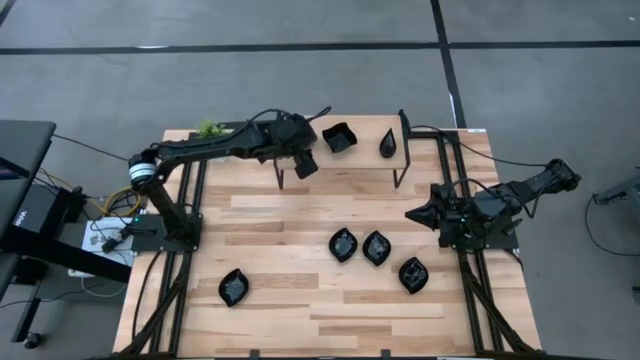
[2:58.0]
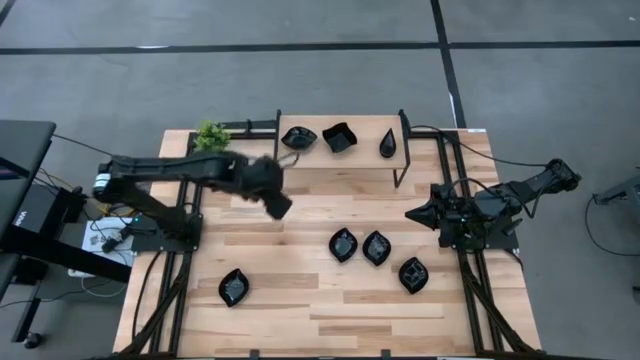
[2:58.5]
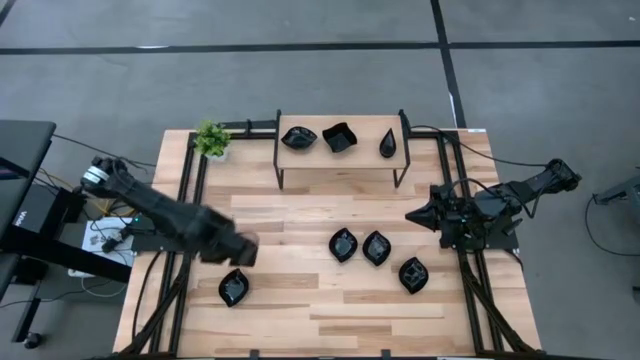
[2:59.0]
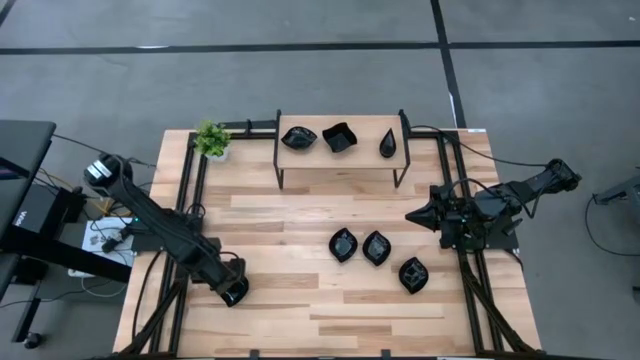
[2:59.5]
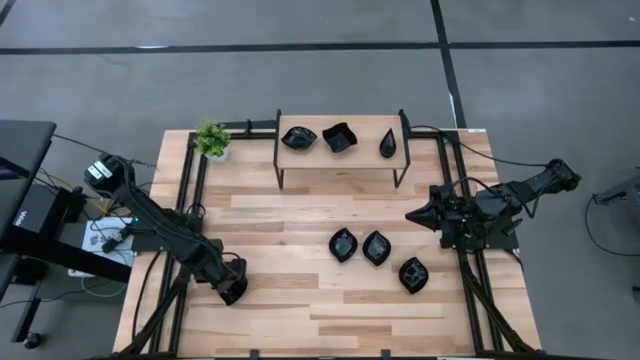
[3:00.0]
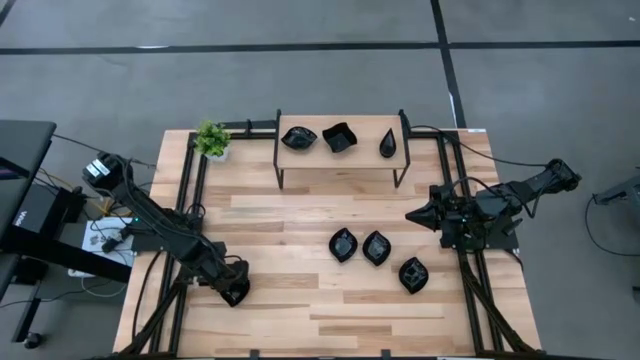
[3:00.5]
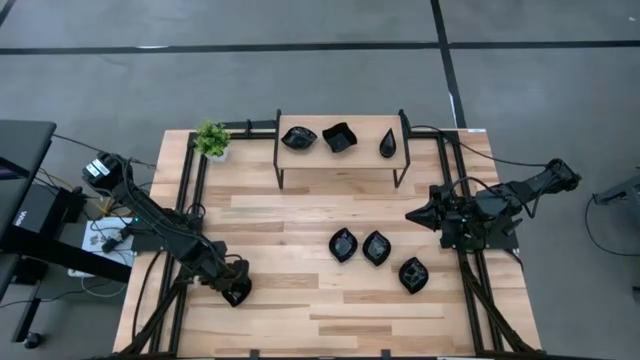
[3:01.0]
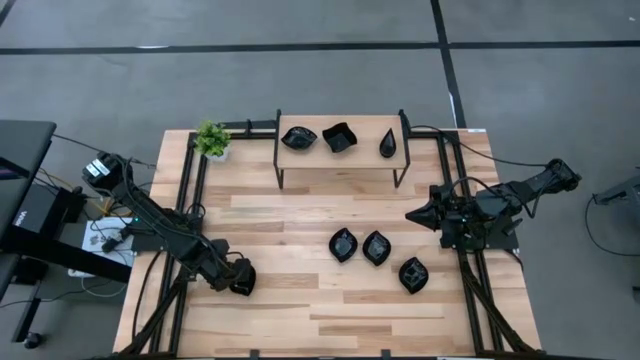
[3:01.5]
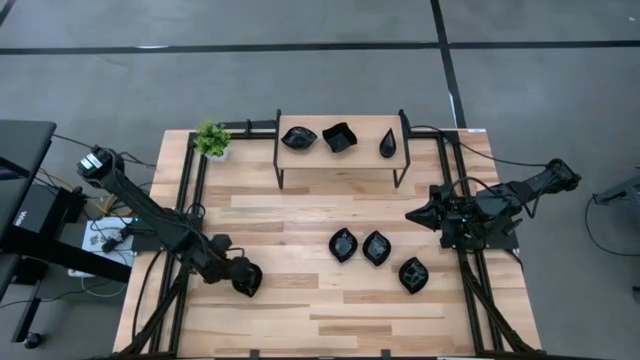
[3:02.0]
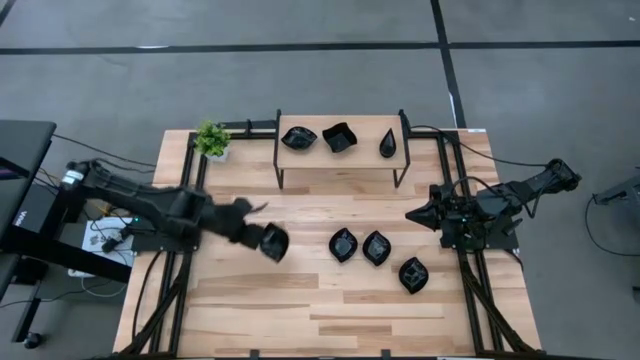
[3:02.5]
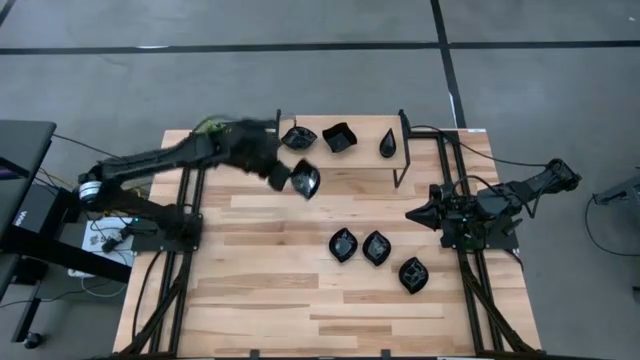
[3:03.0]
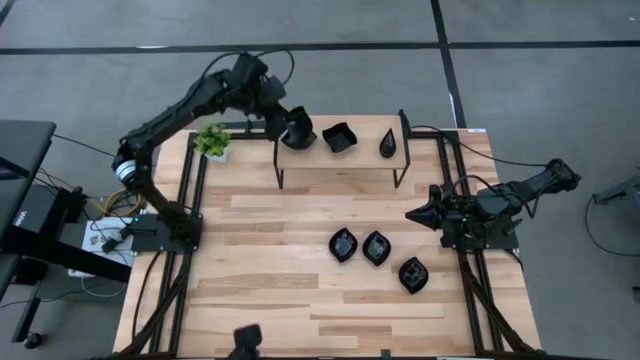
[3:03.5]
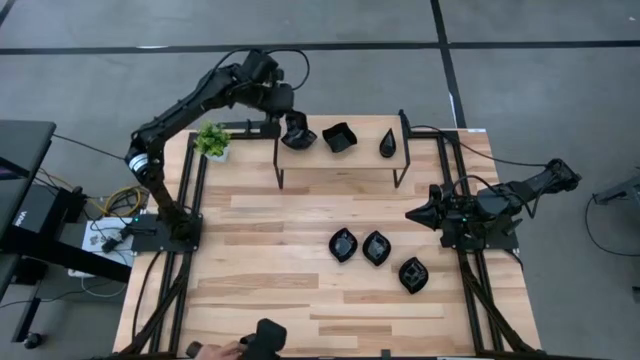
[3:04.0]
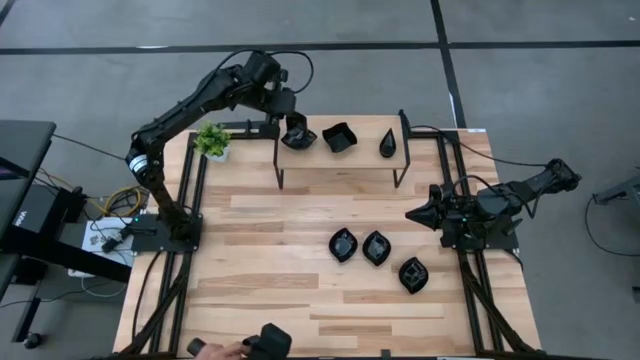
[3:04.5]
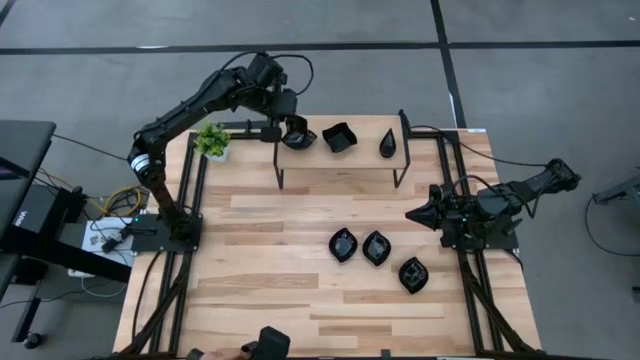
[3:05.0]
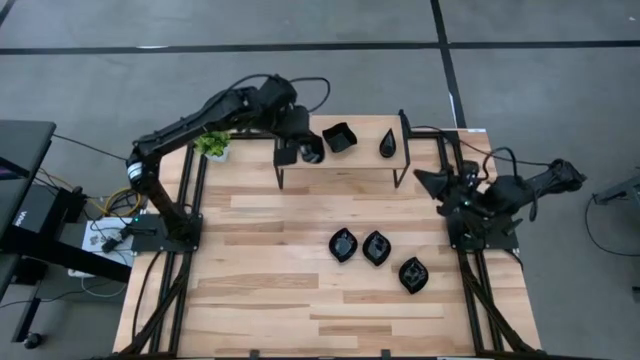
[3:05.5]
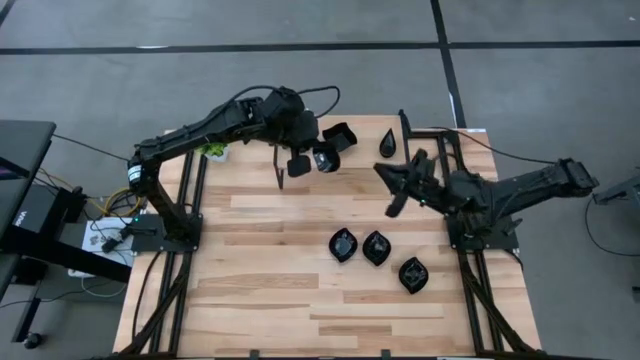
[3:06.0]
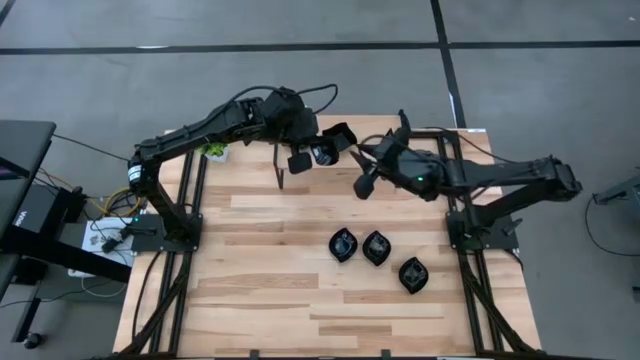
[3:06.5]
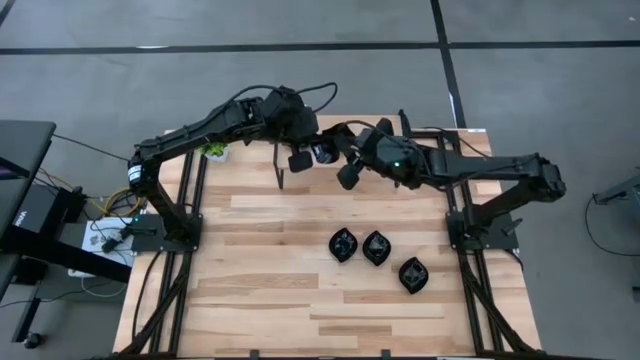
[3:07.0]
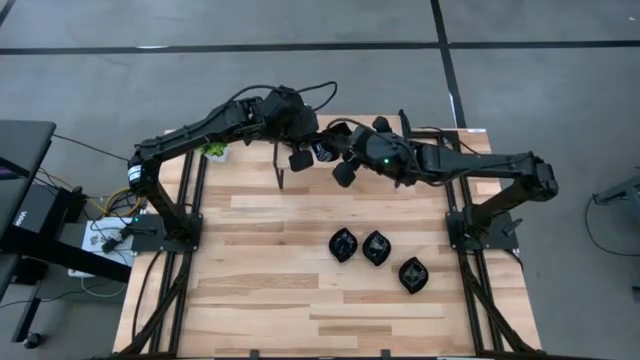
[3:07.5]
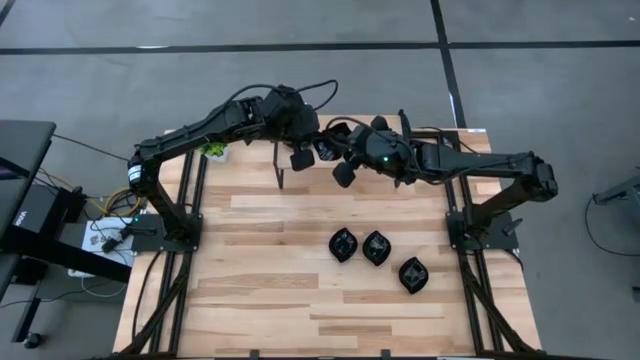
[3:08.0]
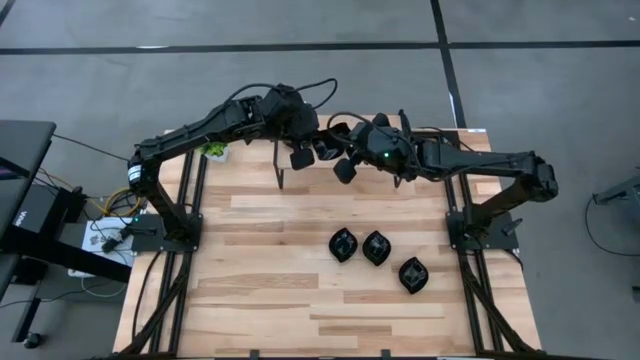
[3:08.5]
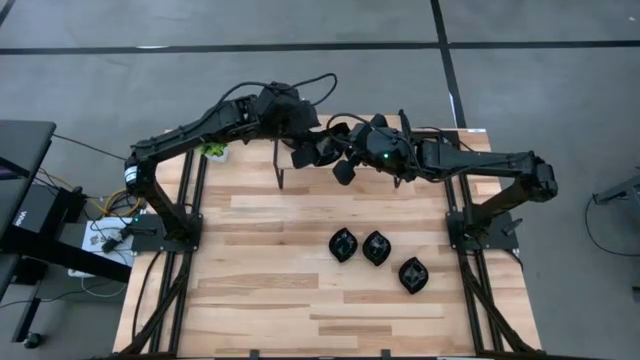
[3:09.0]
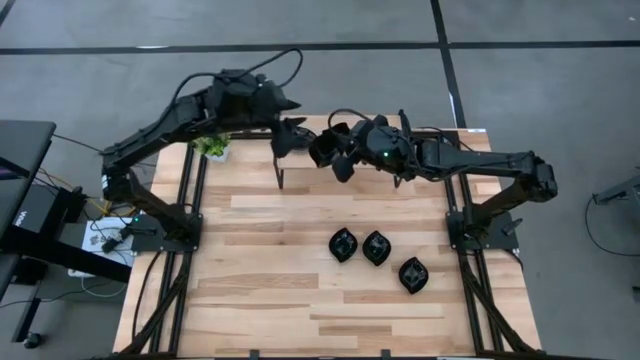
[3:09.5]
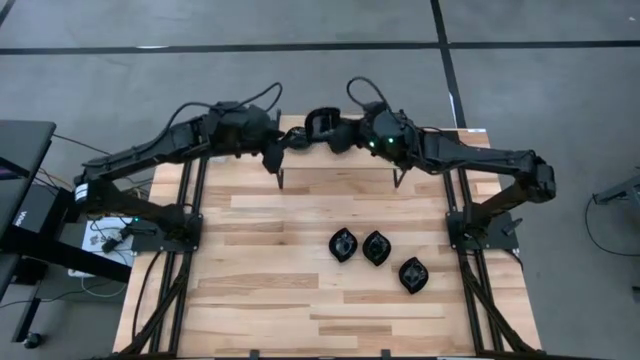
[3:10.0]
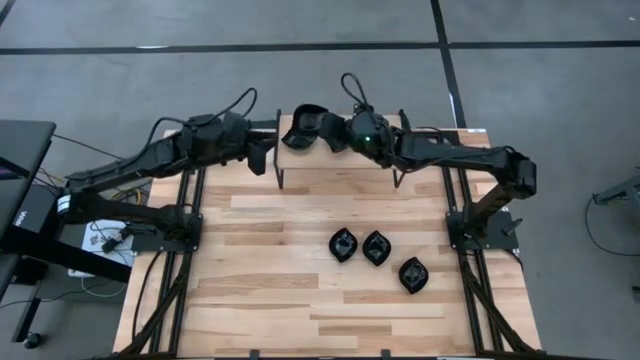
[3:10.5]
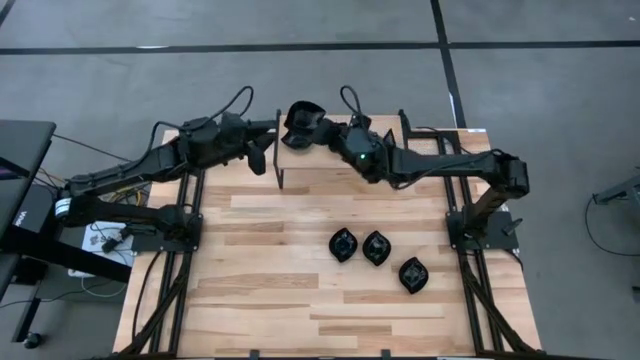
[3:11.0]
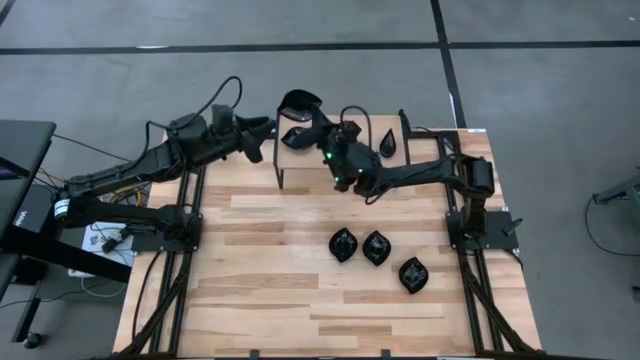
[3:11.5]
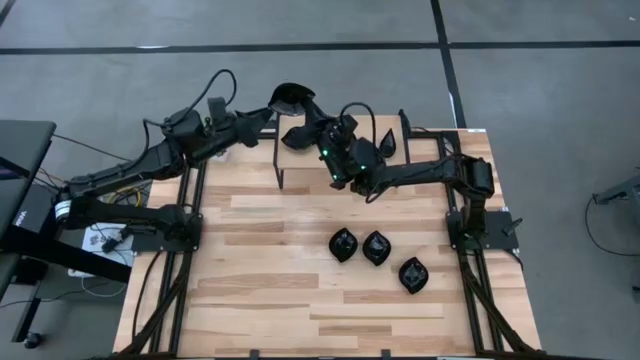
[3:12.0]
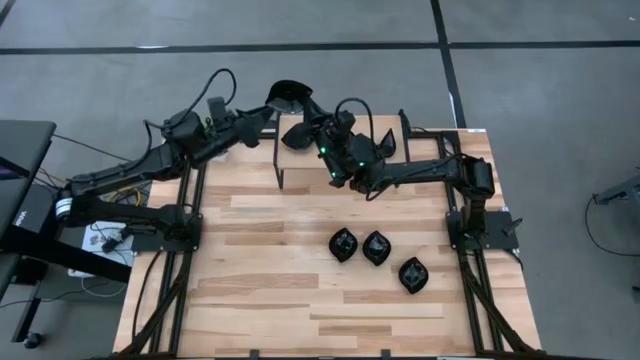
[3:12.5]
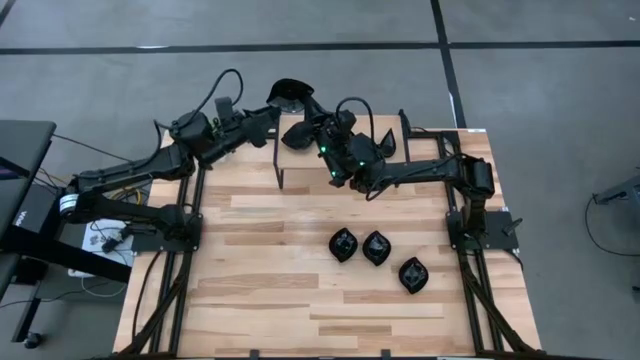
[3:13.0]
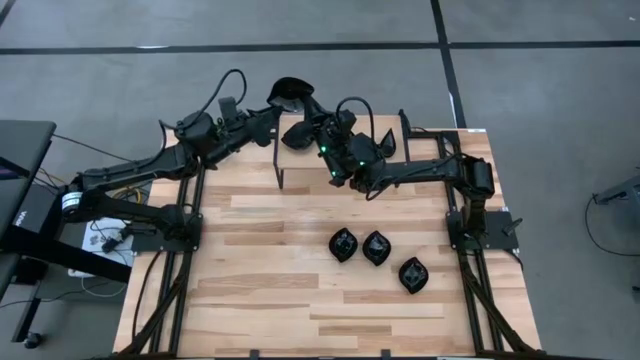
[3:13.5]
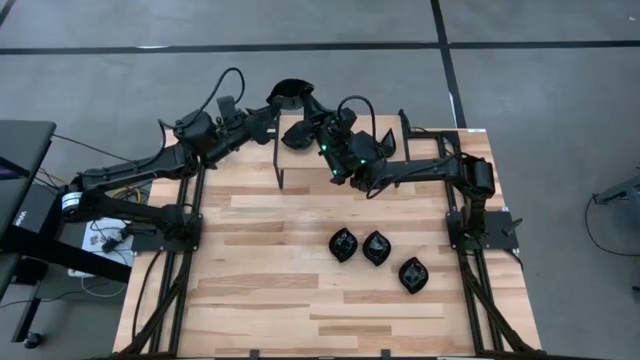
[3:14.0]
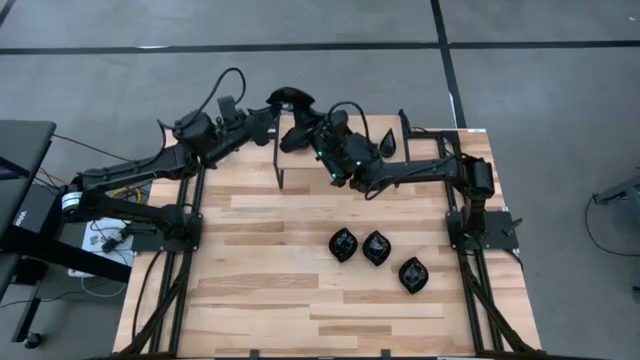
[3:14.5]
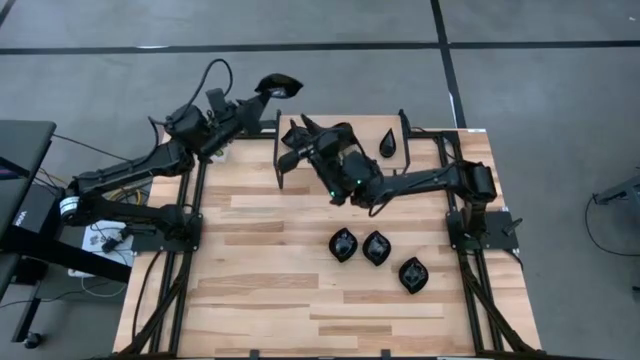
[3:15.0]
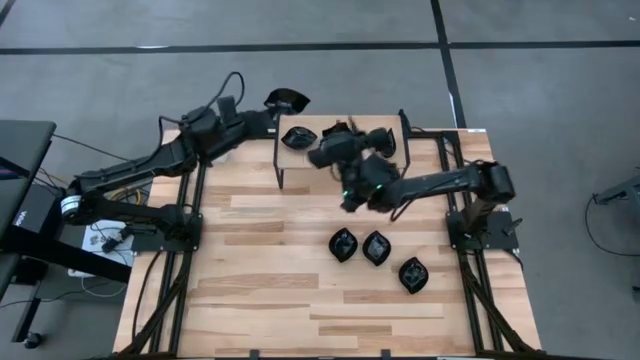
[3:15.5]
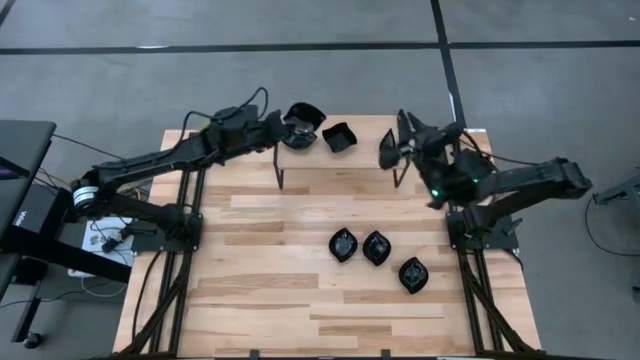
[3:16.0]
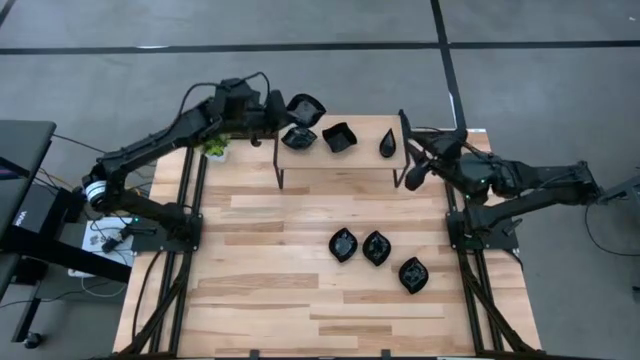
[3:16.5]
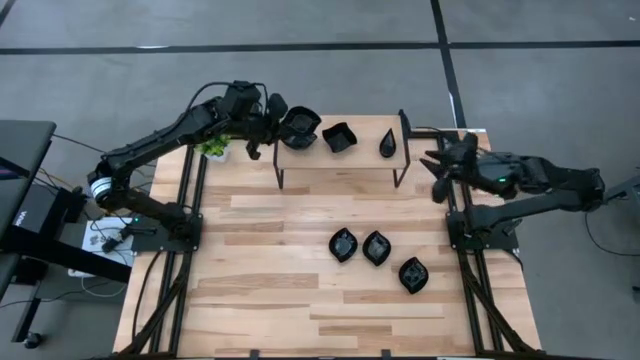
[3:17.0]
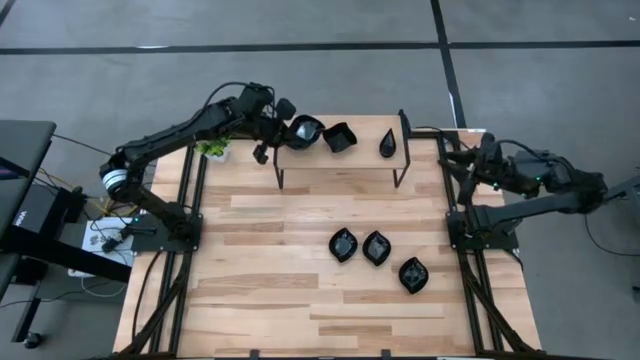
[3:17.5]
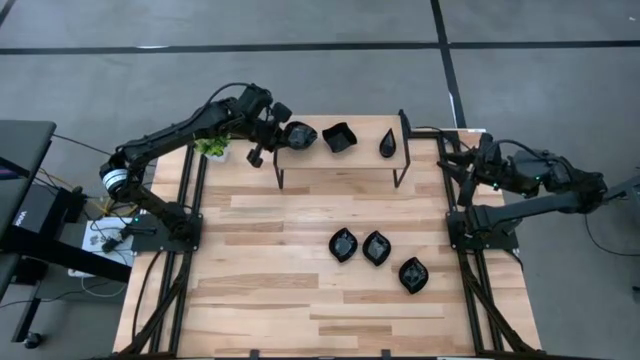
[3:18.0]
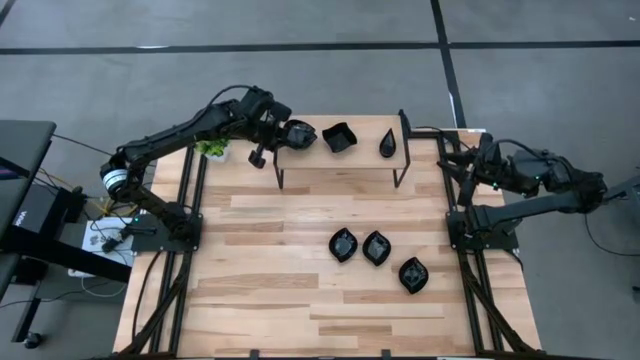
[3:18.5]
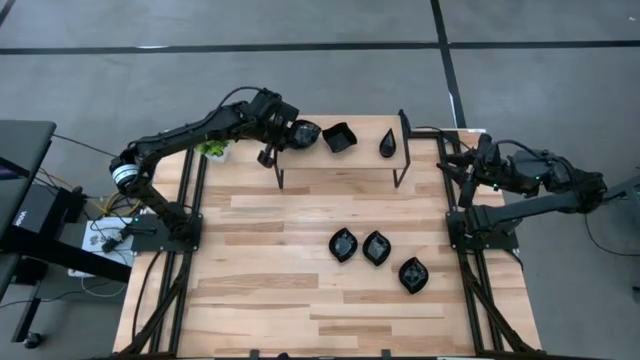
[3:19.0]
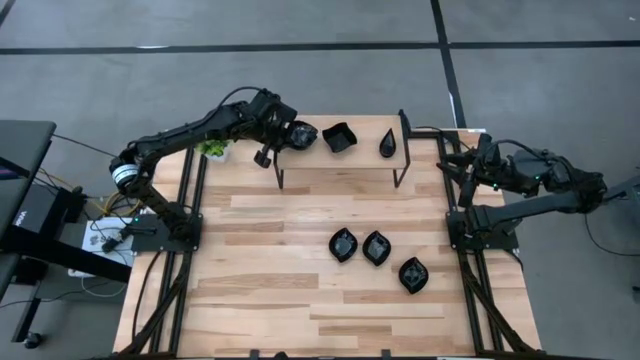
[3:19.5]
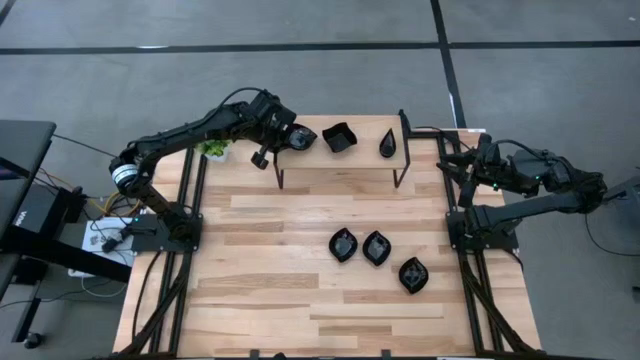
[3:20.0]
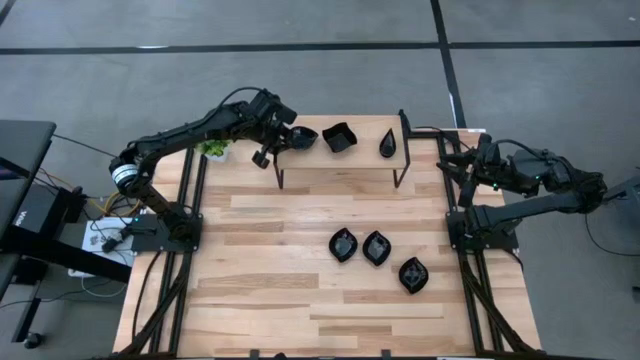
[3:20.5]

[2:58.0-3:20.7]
Task: Pick & Place Mini shaped plates
Stack the black plate on top of the black plate on the shelf
